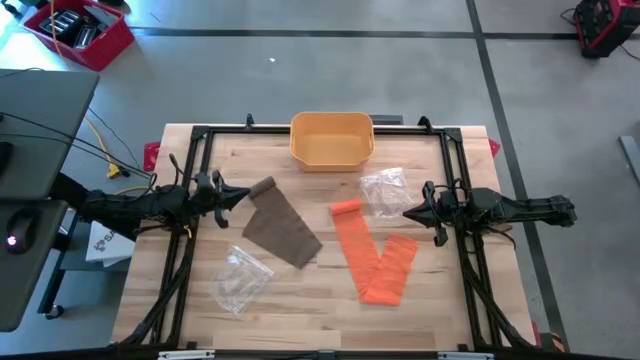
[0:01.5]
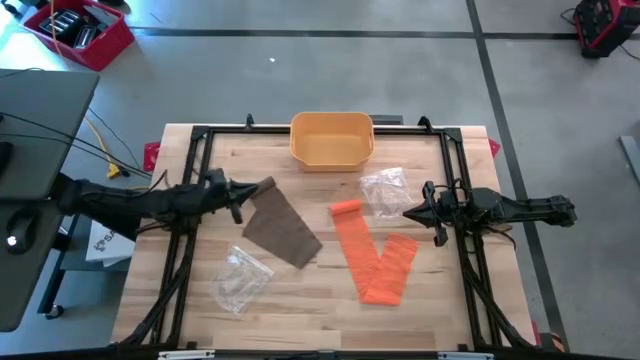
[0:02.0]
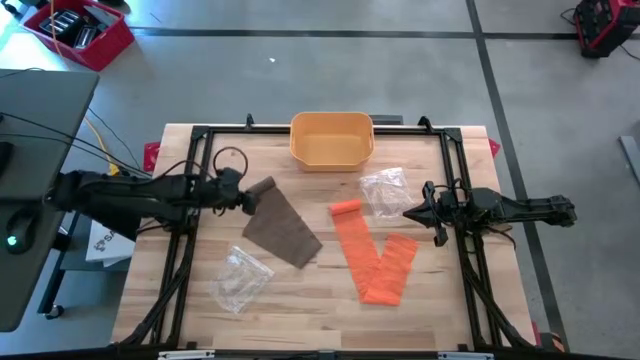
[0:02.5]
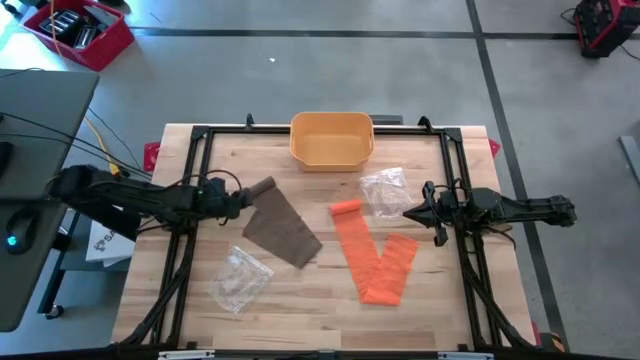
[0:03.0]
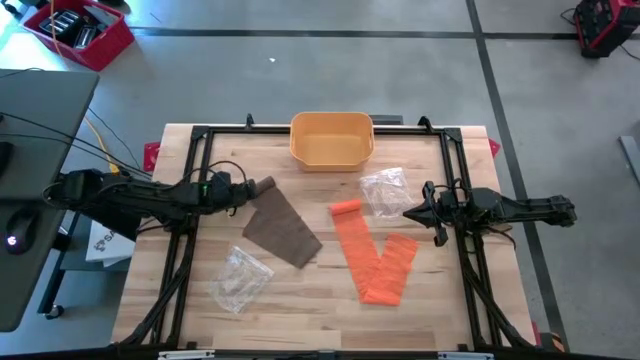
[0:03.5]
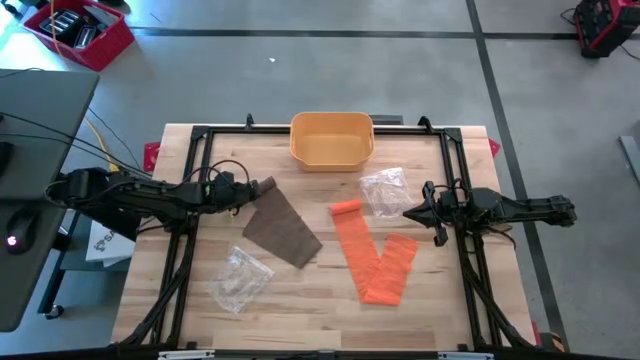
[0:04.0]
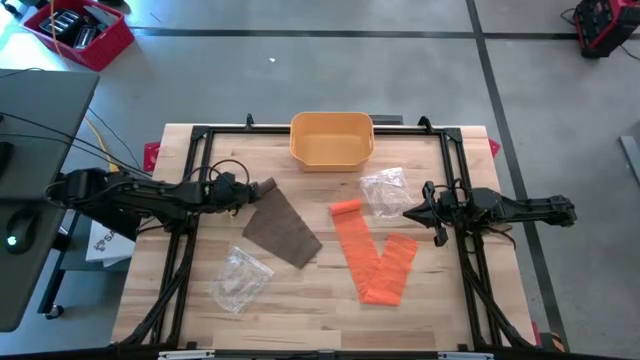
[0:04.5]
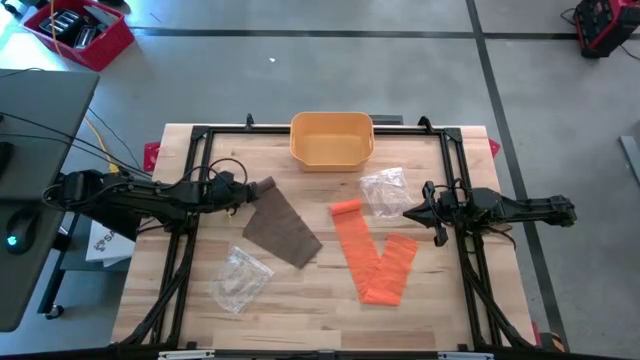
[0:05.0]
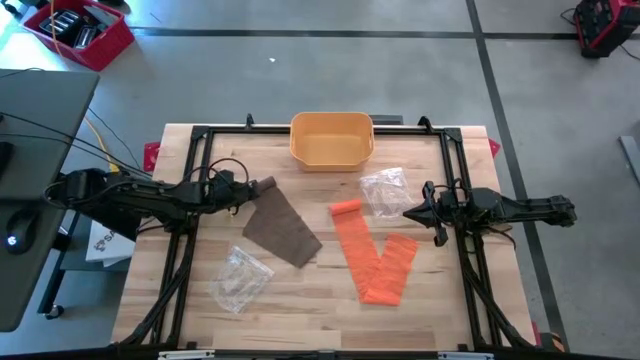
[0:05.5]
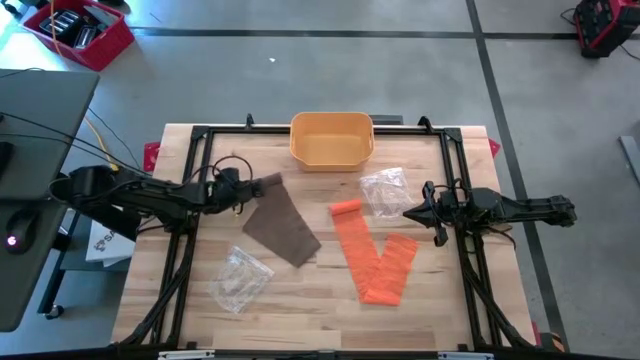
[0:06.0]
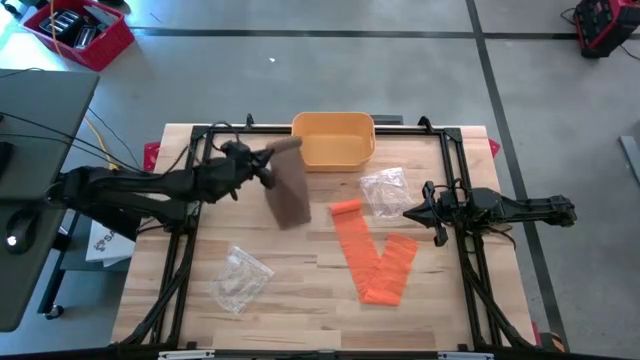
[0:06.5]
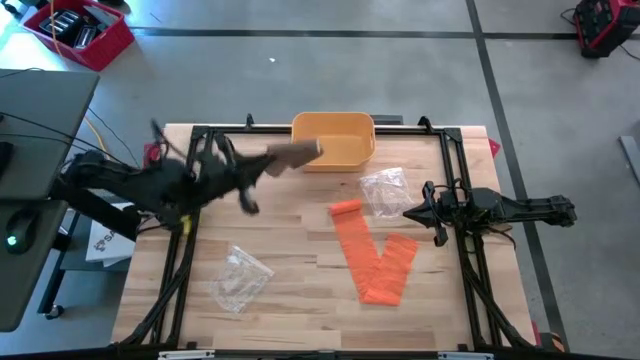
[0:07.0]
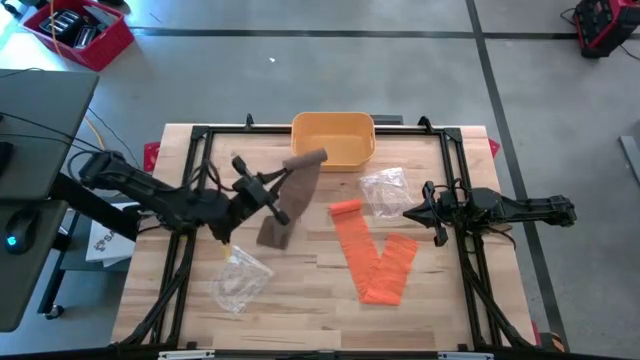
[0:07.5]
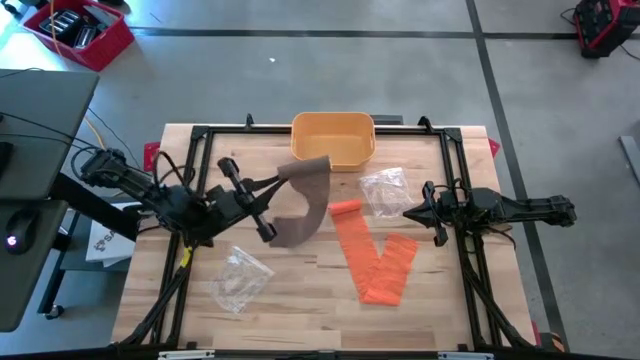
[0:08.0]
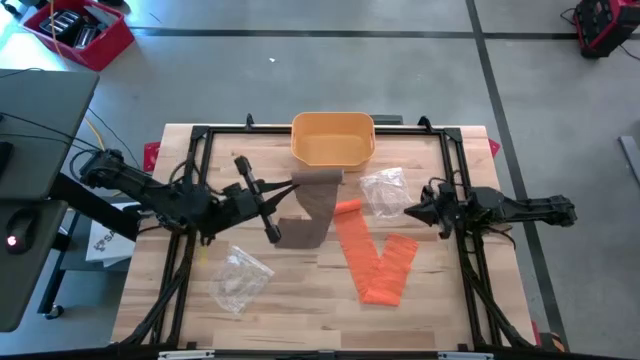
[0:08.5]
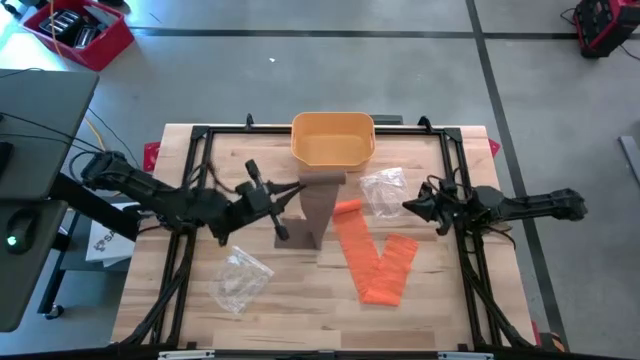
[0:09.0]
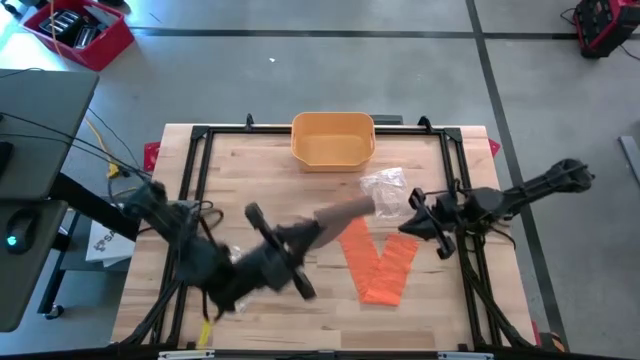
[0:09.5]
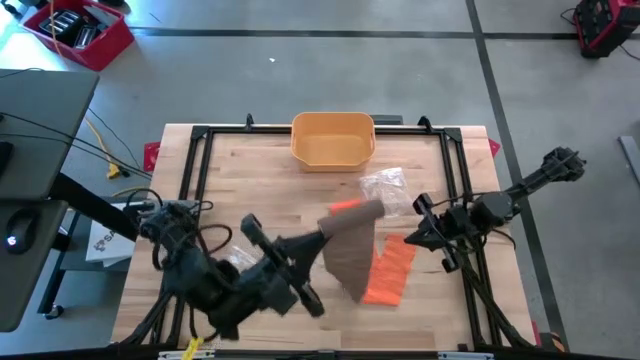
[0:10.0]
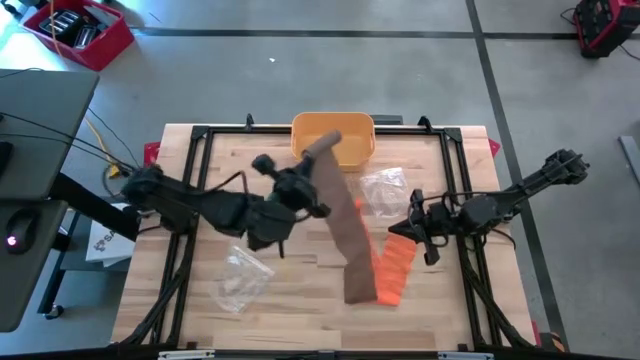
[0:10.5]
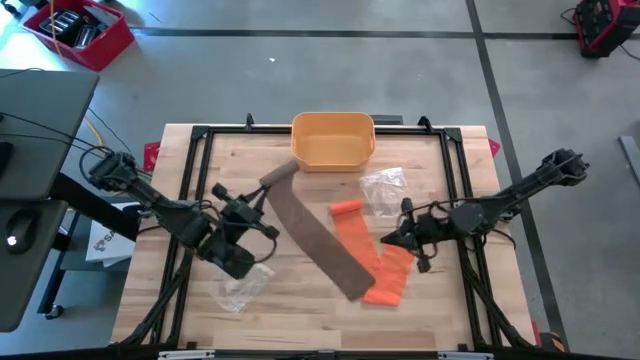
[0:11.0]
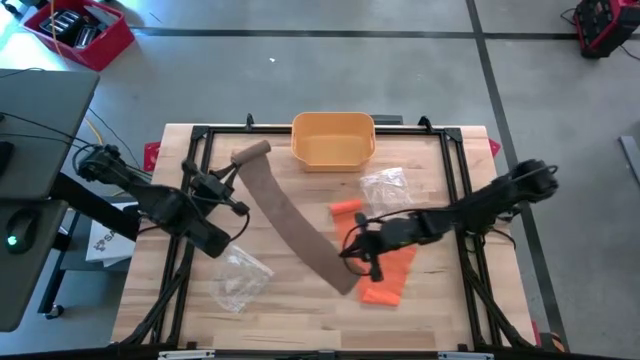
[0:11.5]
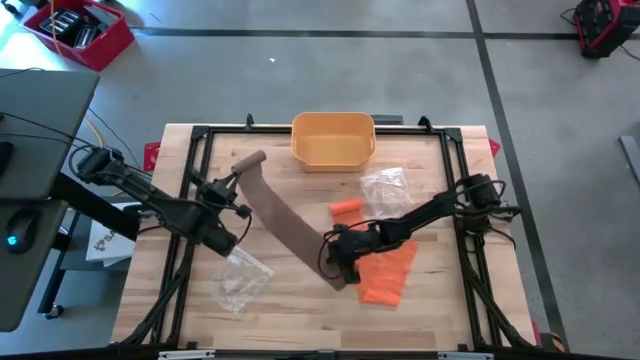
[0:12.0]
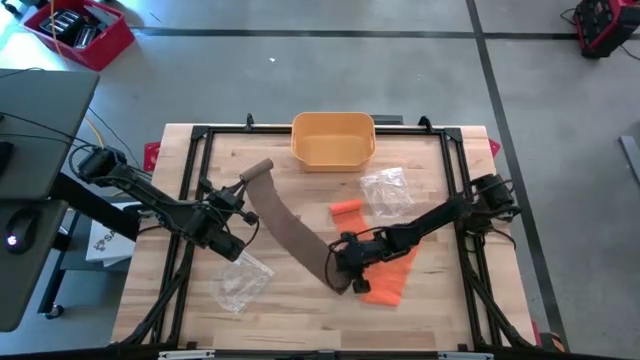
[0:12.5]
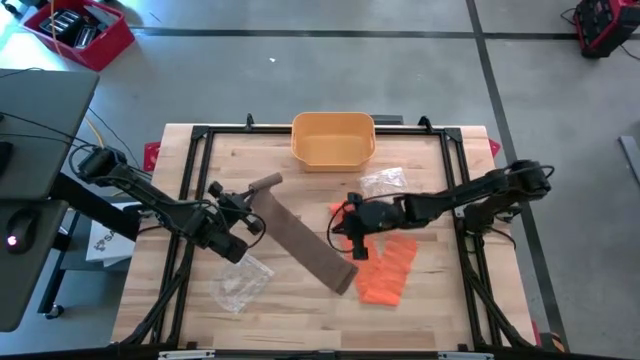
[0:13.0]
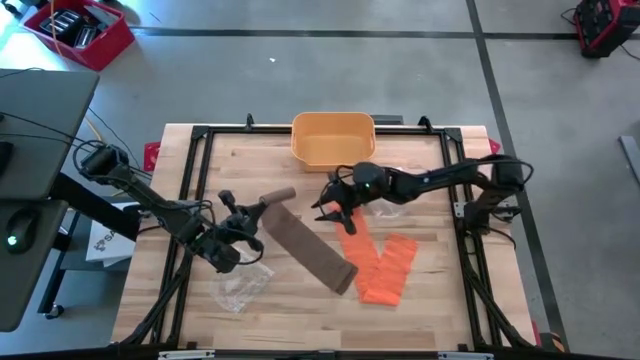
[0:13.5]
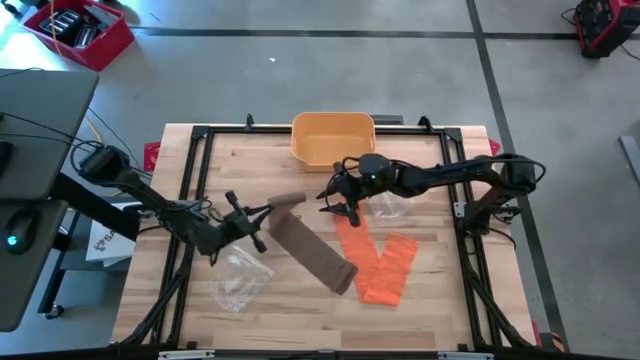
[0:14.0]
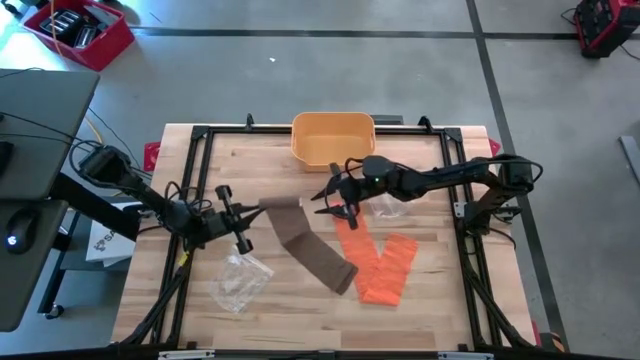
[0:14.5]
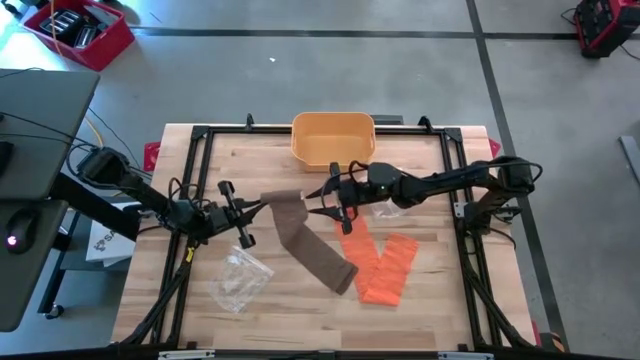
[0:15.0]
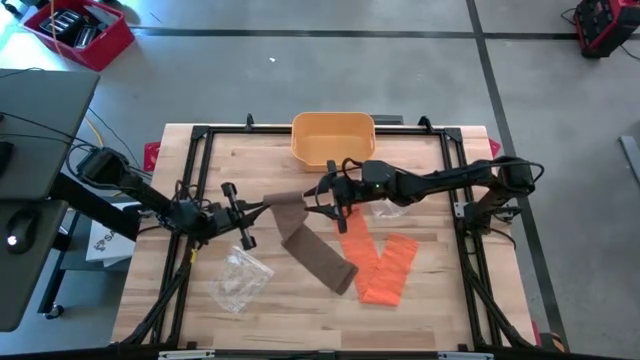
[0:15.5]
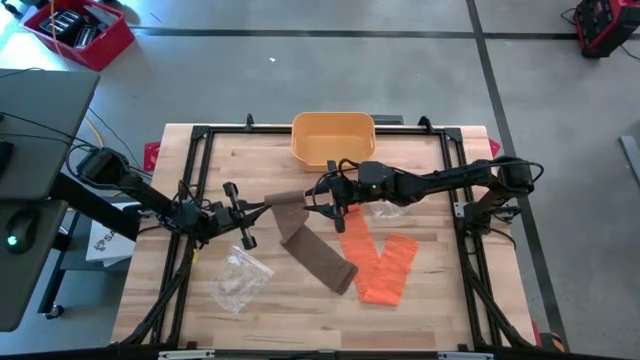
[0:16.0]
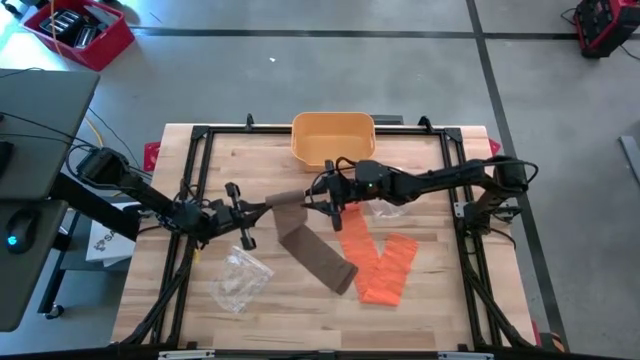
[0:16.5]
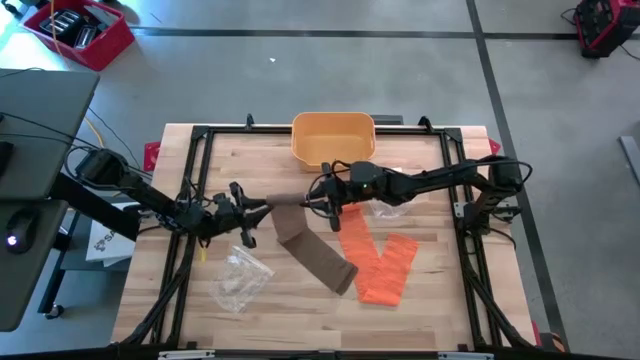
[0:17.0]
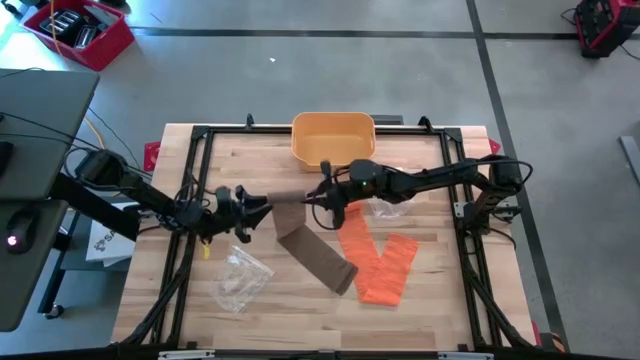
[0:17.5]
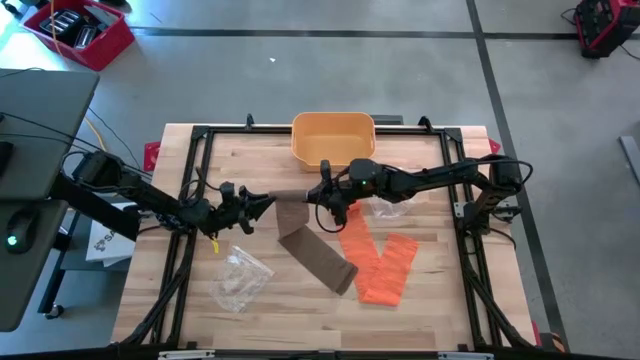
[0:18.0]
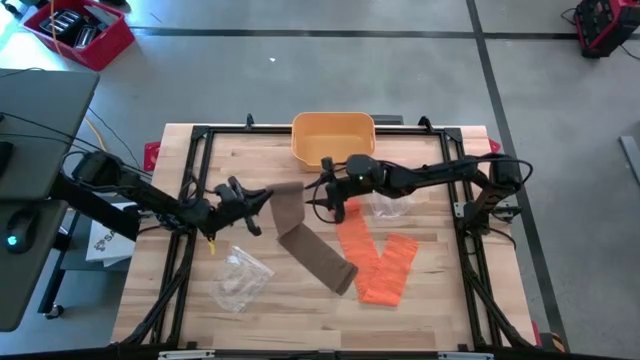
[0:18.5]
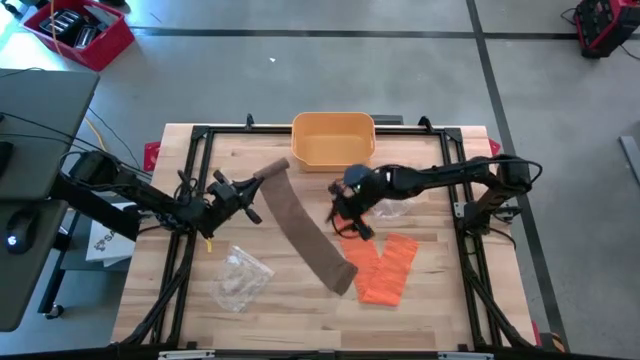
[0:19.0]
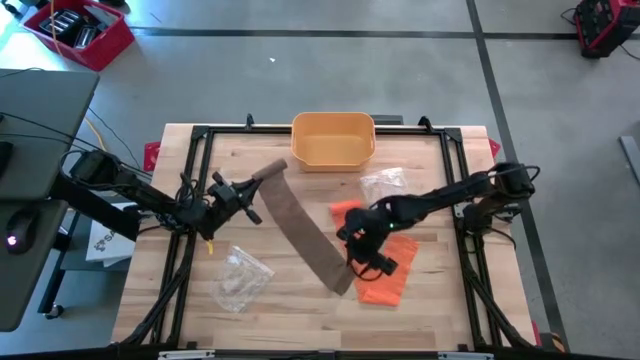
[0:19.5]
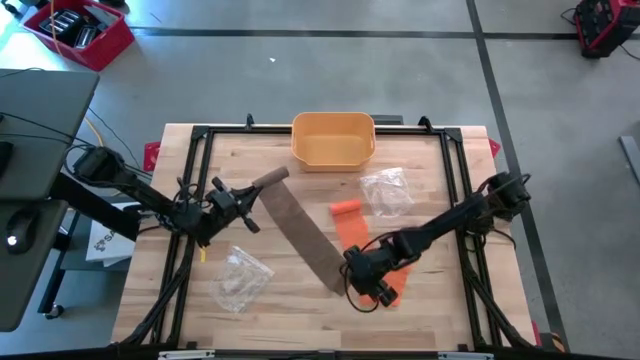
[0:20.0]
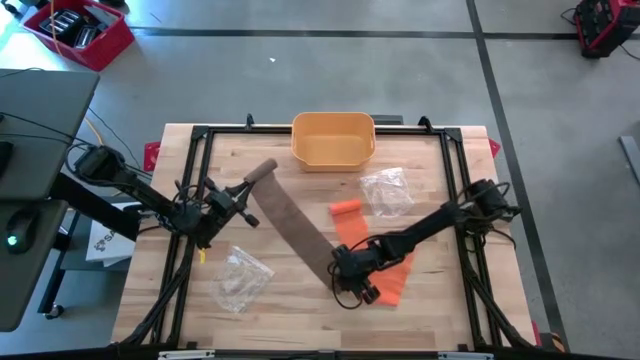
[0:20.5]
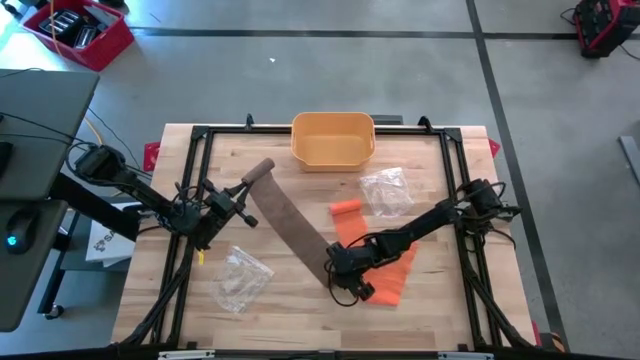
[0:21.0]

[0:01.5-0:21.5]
Task: Roll bandage
Roll the brown bandage
